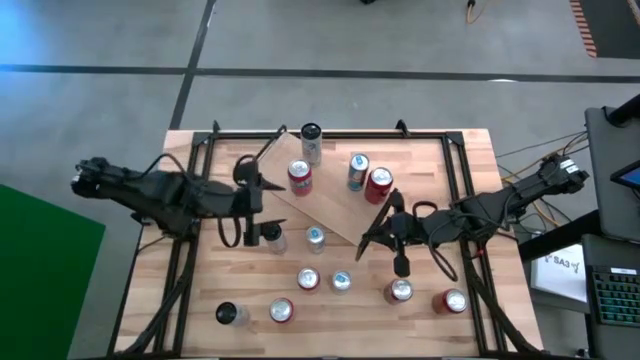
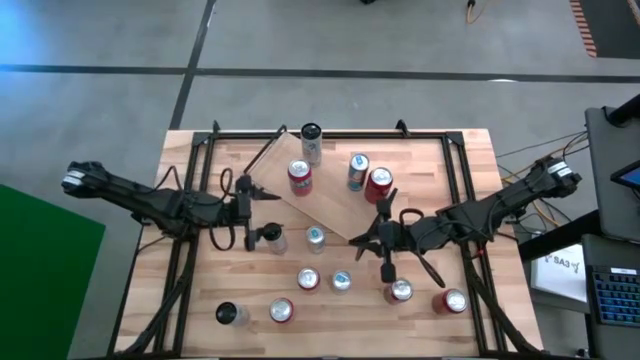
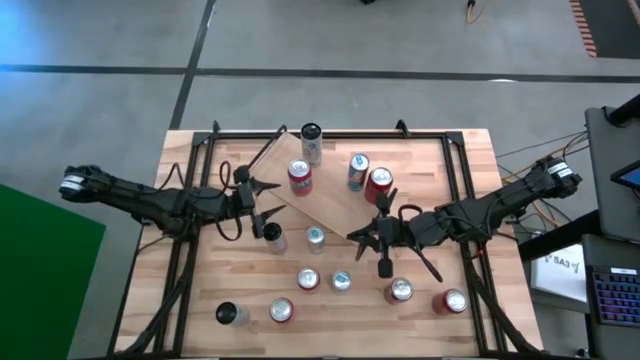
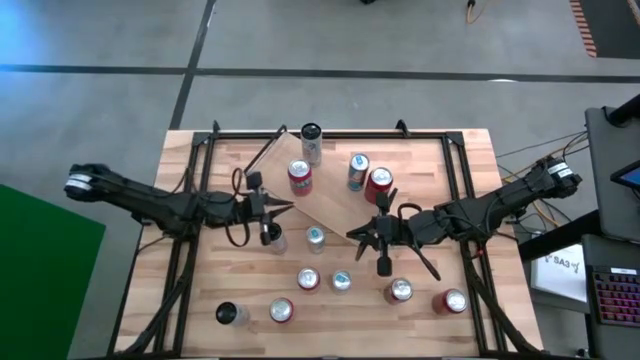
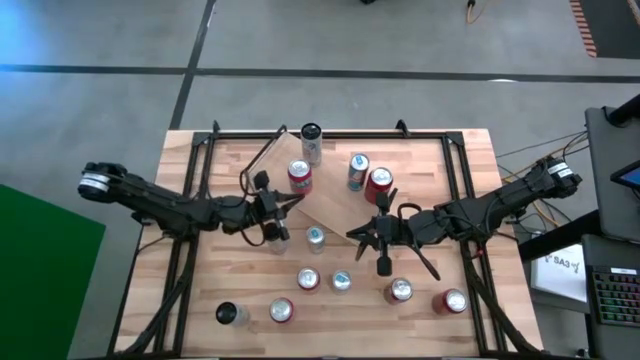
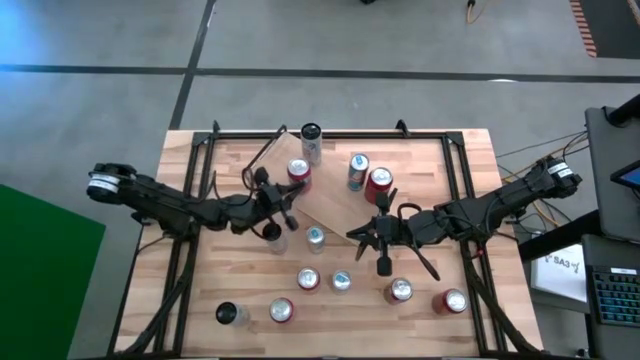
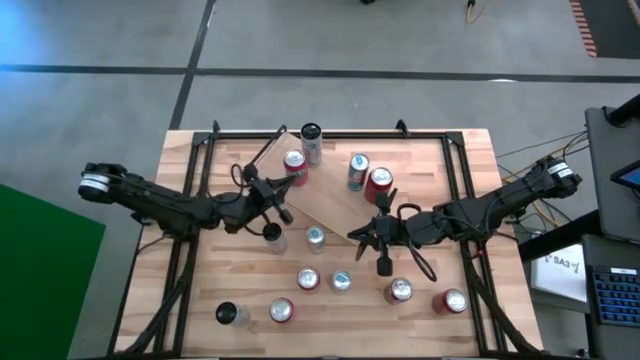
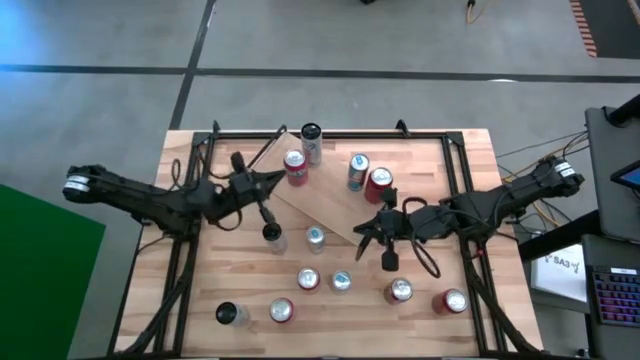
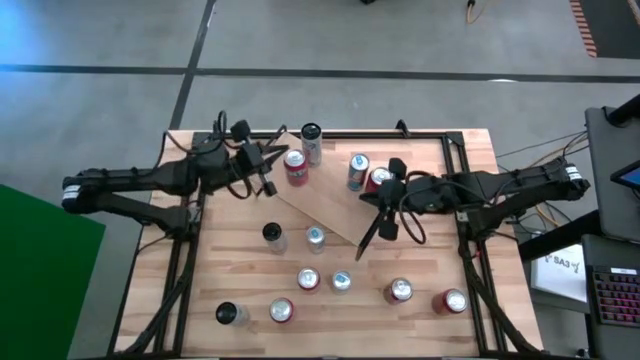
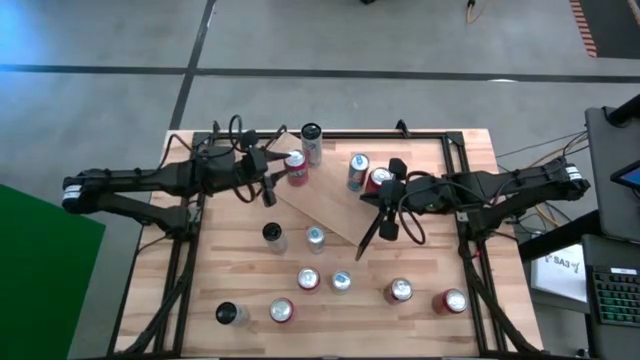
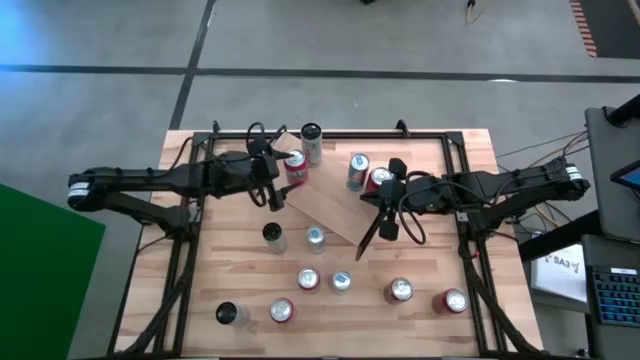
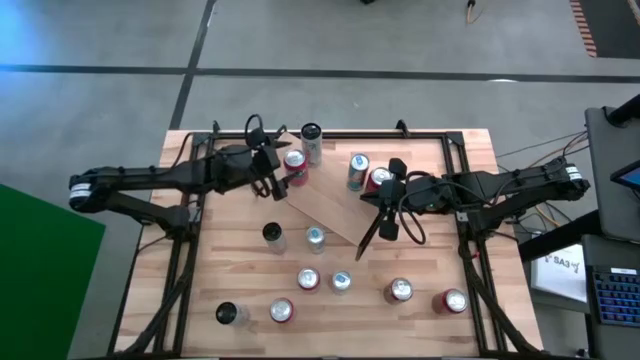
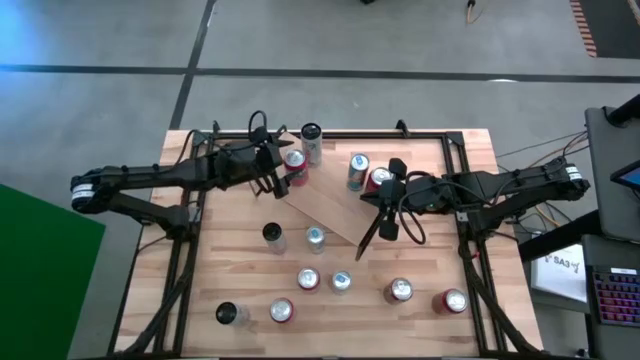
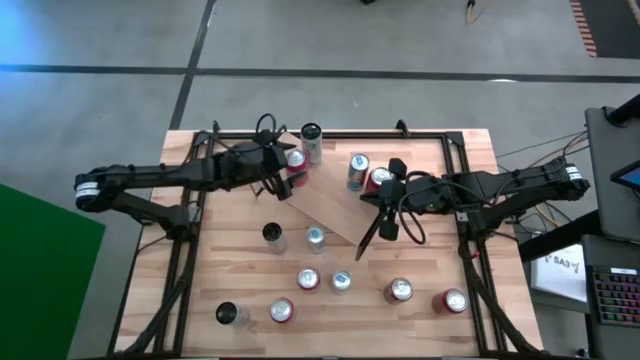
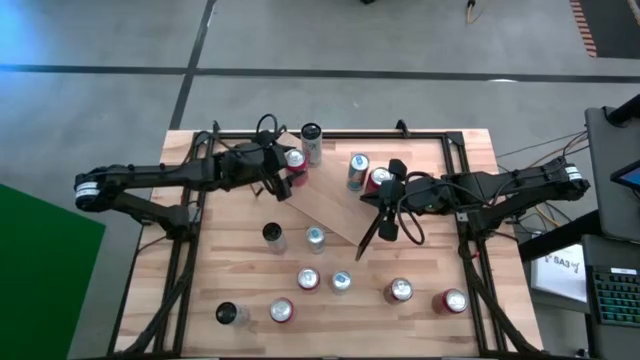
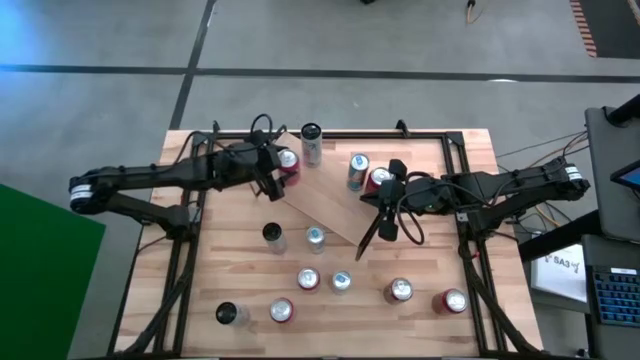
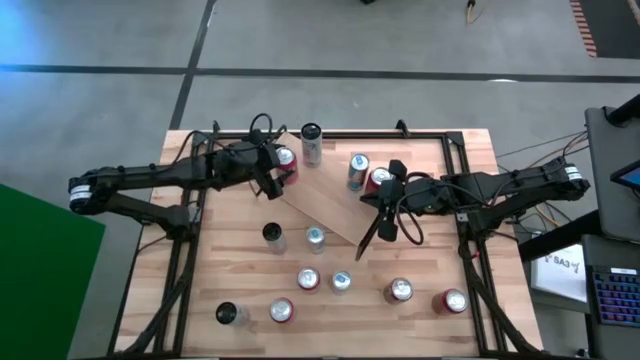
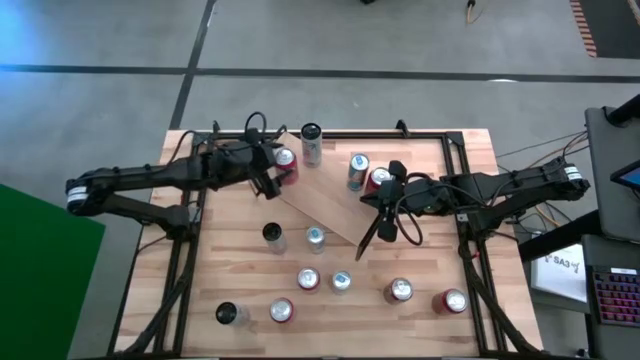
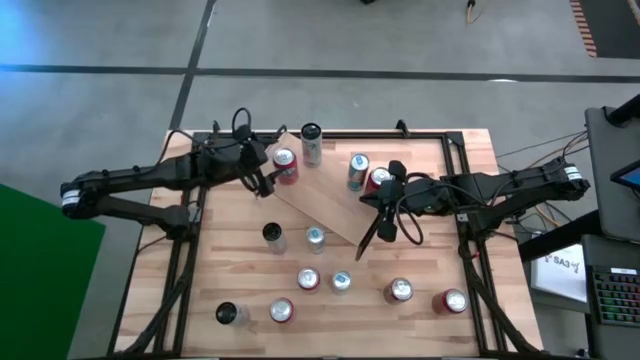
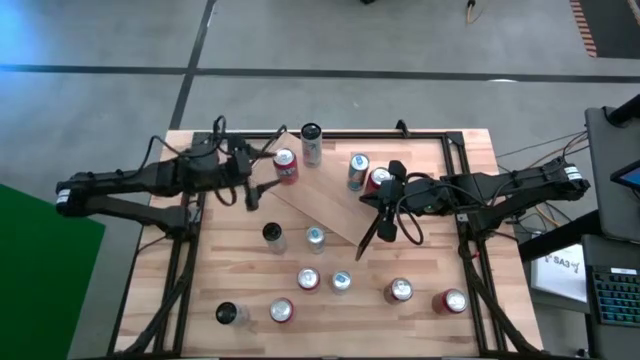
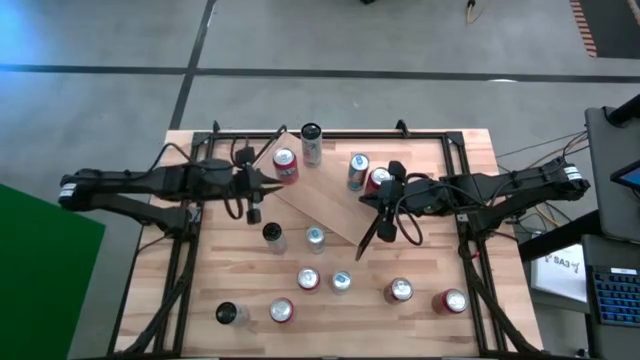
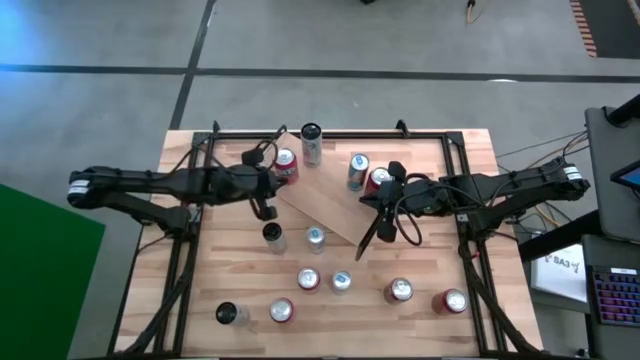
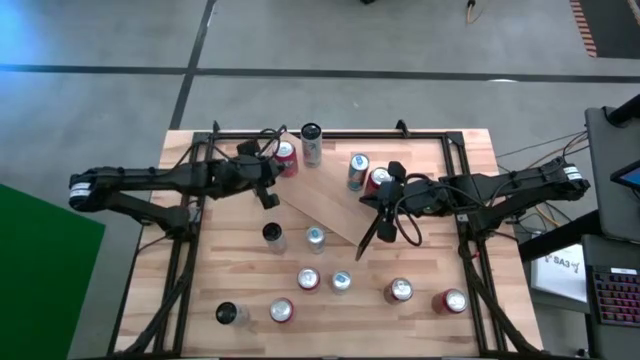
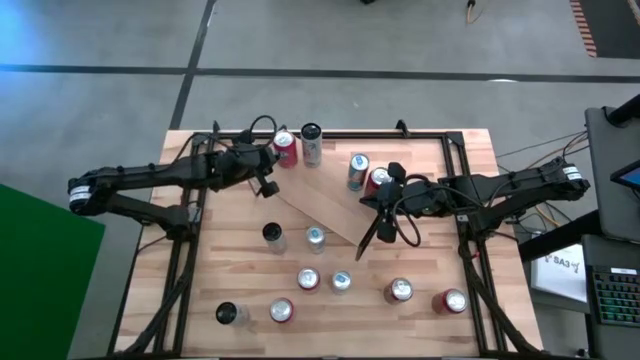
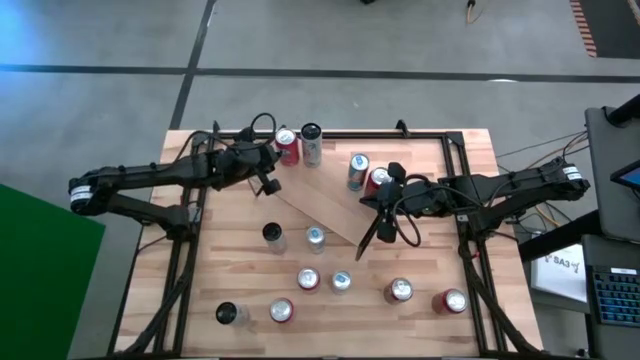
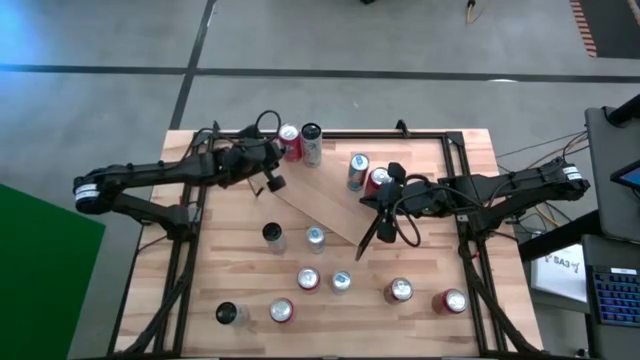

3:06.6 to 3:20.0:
Task: Place canned beverage on shelf
Put the red soda can on the shelf

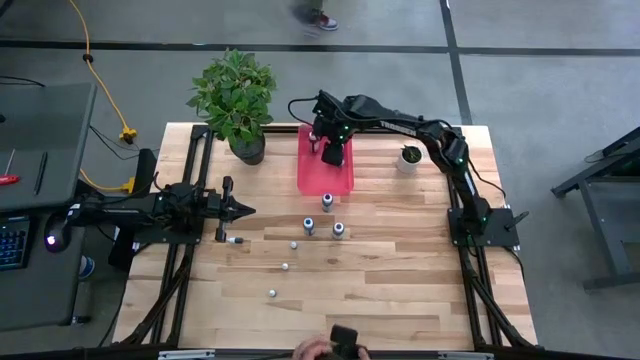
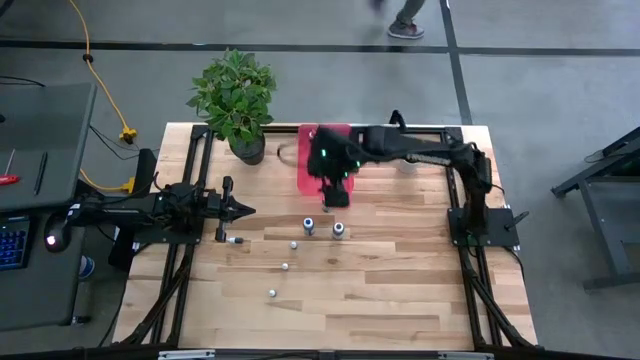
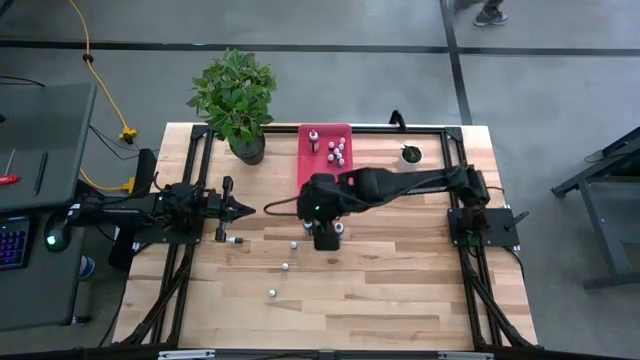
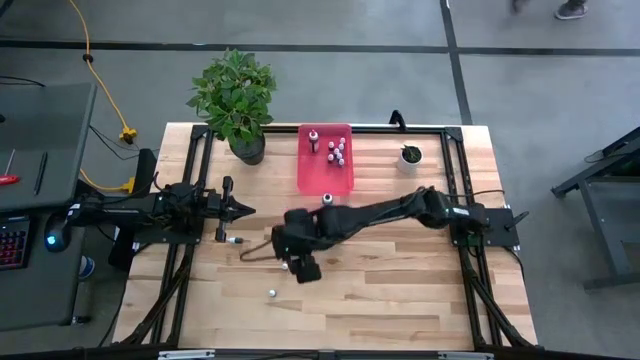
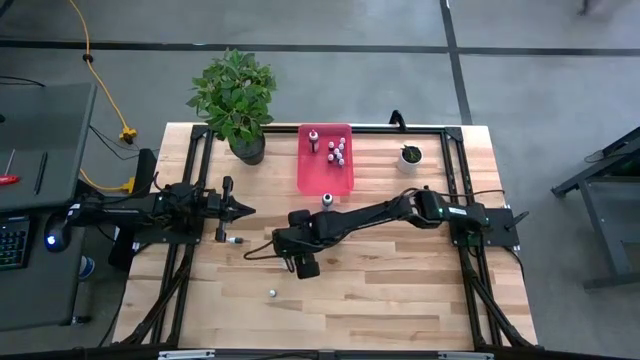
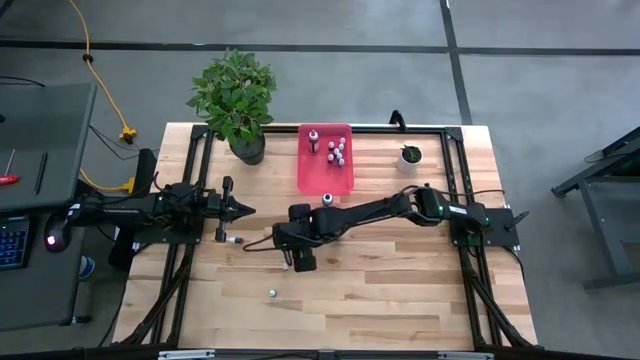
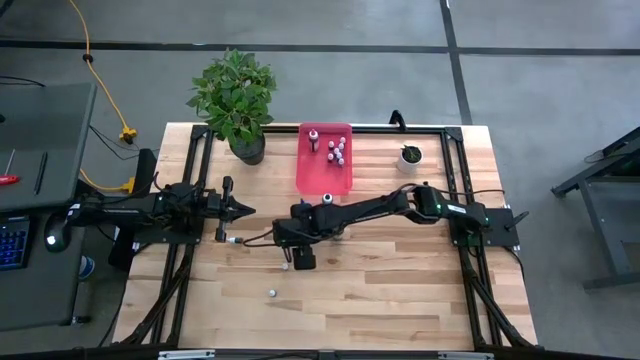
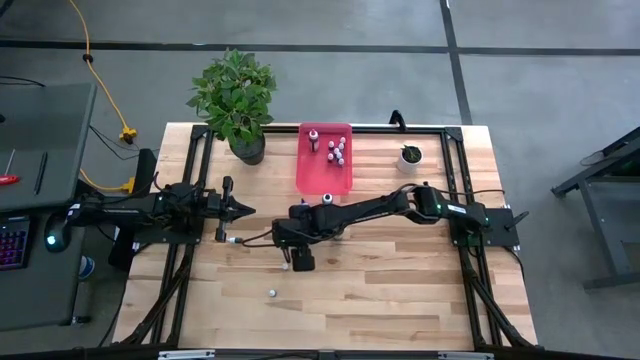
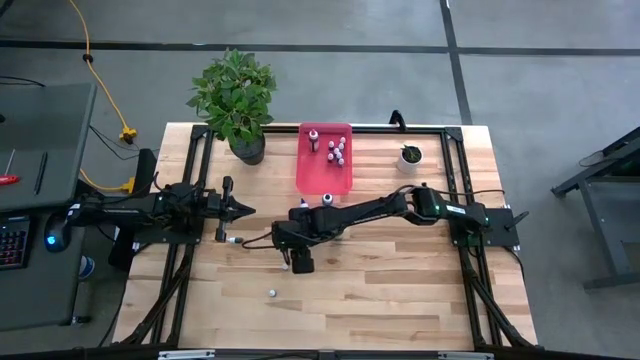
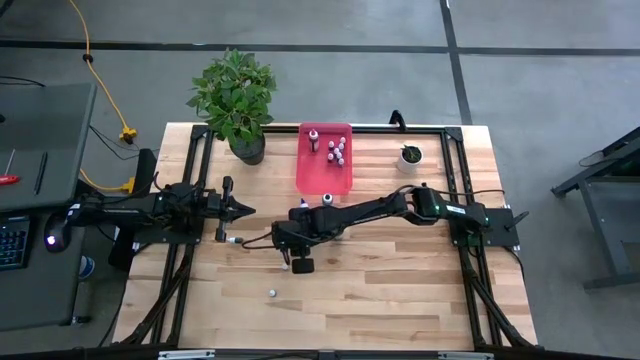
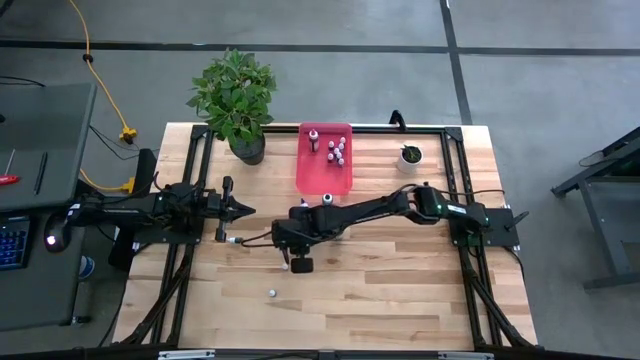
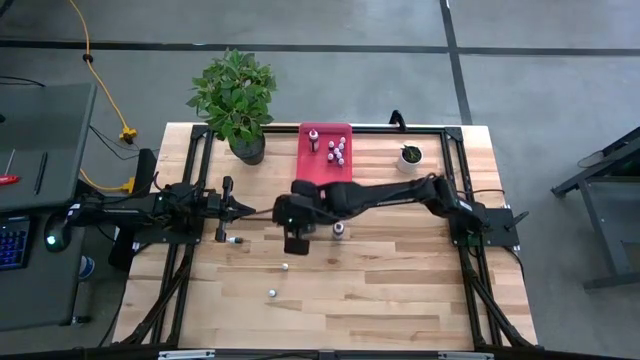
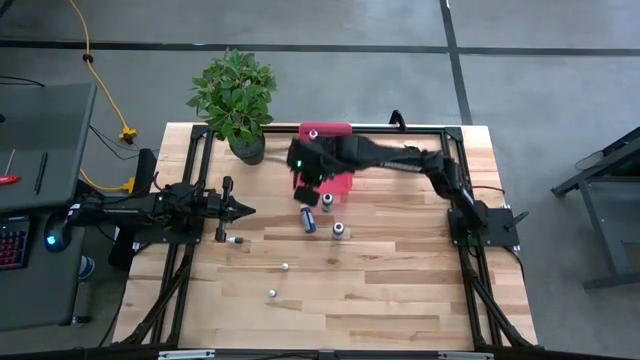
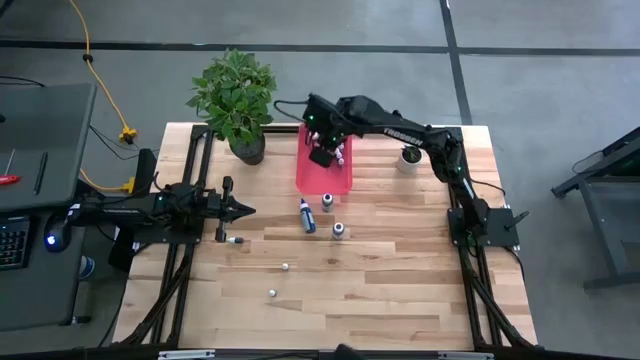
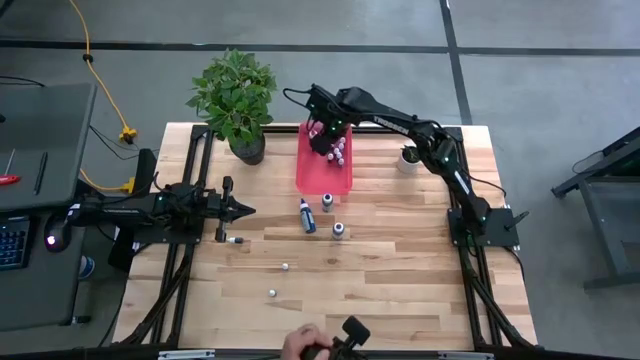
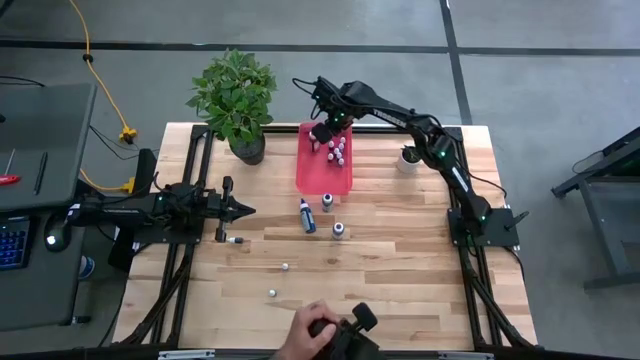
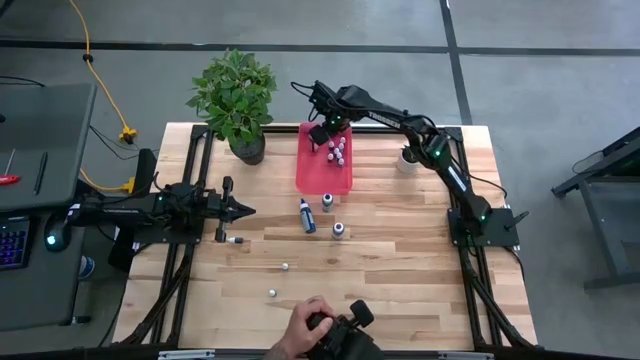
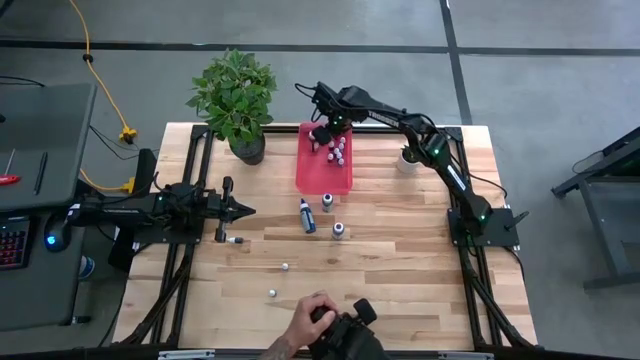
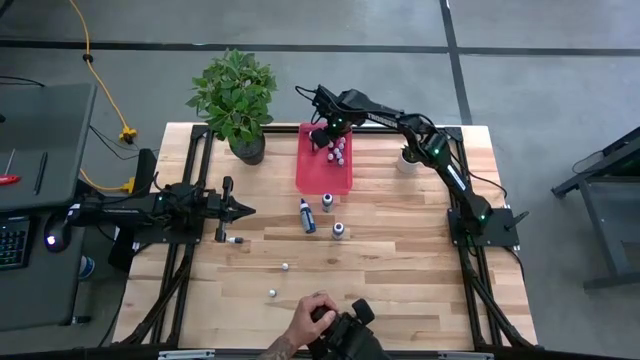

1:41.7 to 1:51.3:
Task: Pick & Place food coloring
Put the purple food coloring bottle into the pink bin
